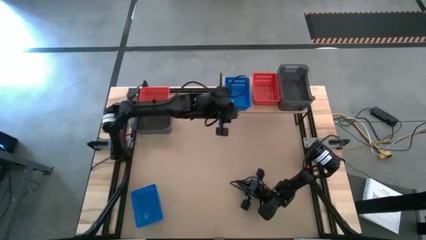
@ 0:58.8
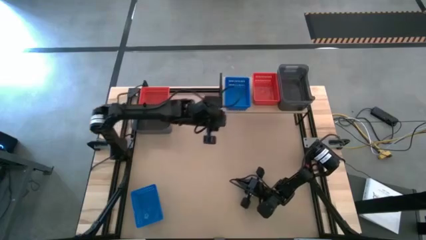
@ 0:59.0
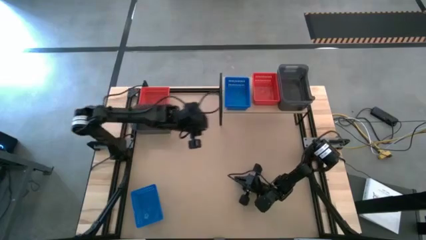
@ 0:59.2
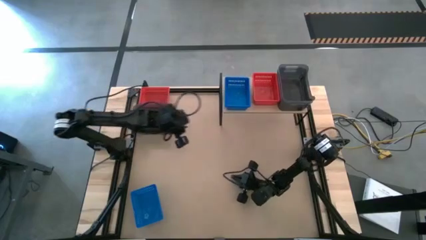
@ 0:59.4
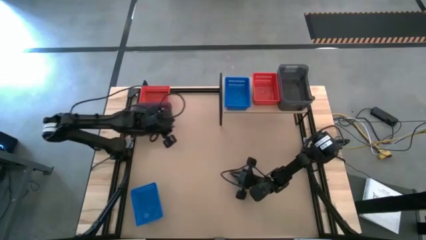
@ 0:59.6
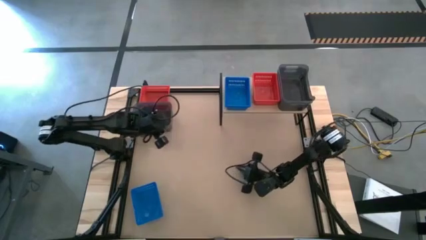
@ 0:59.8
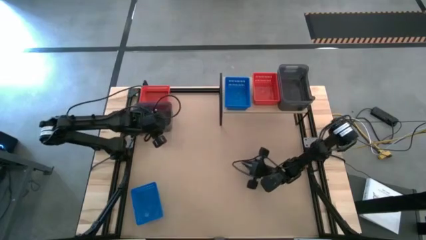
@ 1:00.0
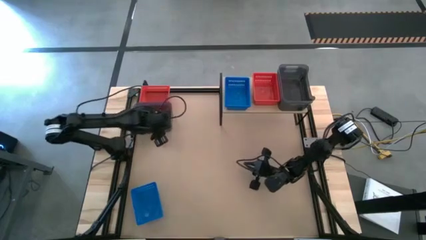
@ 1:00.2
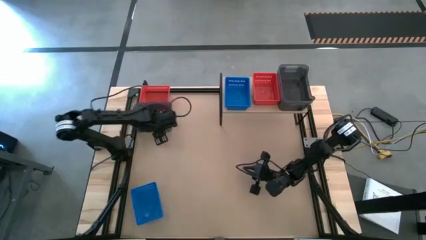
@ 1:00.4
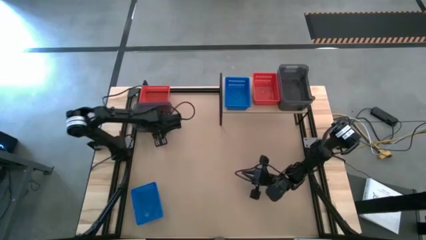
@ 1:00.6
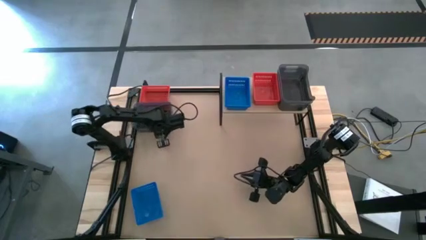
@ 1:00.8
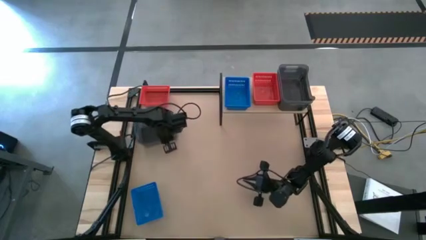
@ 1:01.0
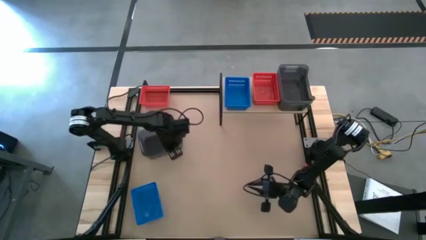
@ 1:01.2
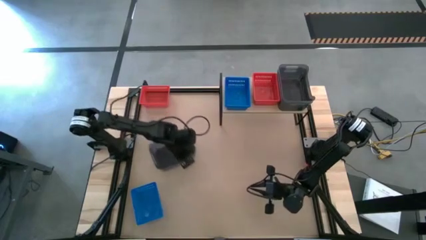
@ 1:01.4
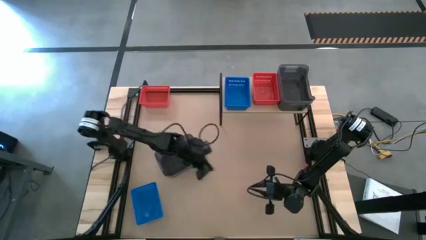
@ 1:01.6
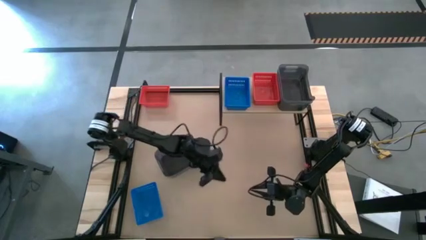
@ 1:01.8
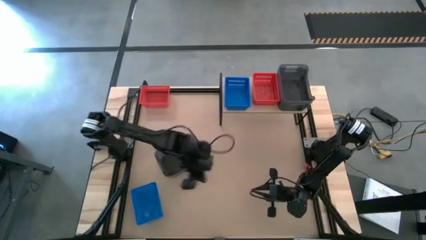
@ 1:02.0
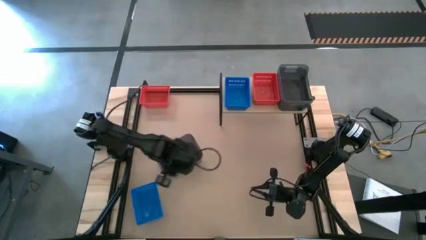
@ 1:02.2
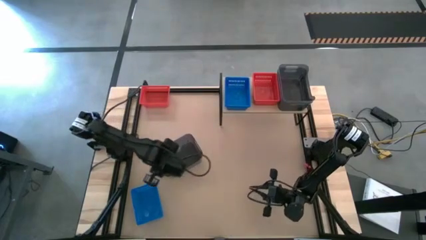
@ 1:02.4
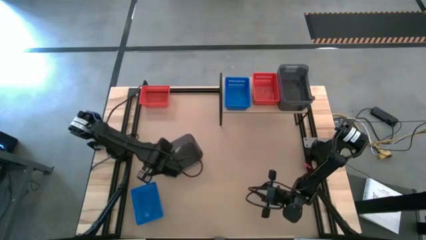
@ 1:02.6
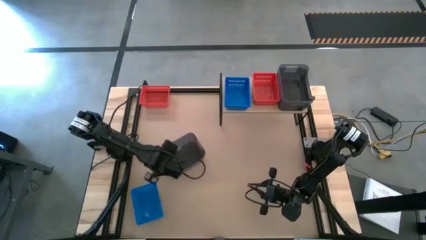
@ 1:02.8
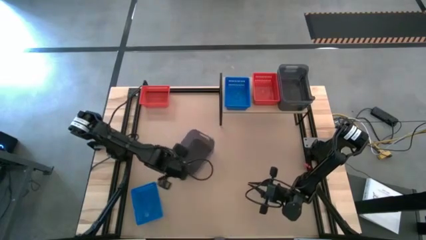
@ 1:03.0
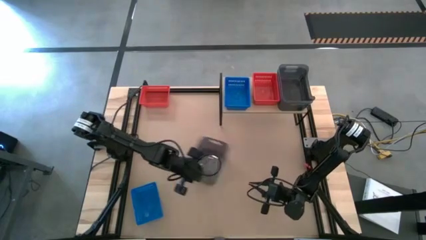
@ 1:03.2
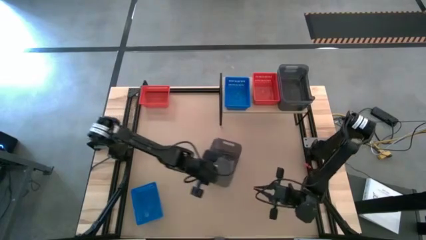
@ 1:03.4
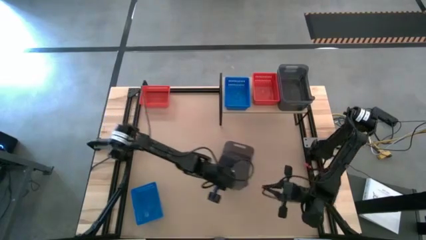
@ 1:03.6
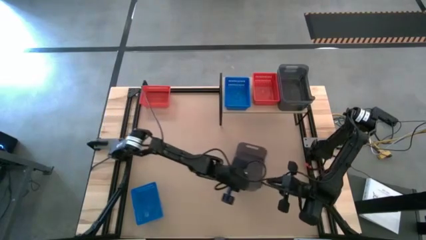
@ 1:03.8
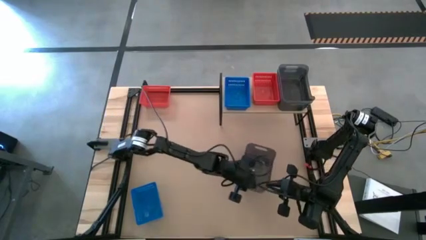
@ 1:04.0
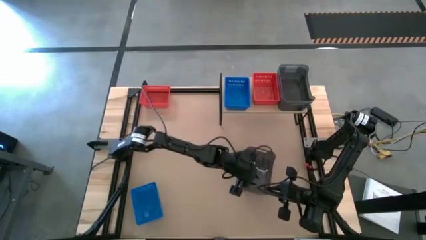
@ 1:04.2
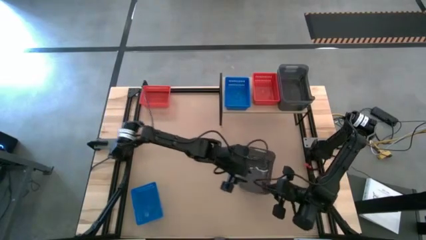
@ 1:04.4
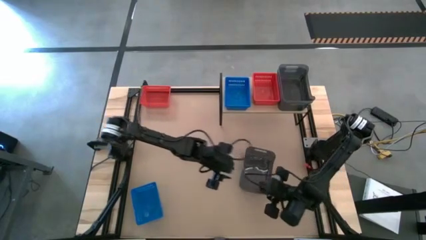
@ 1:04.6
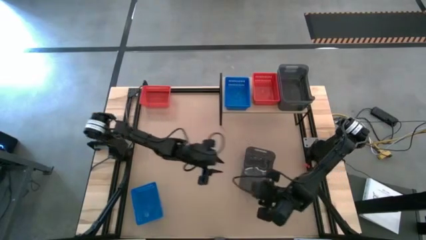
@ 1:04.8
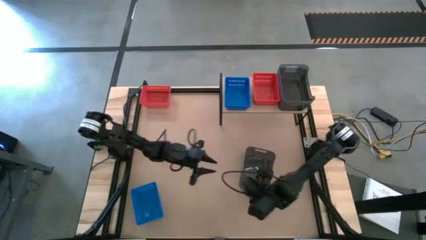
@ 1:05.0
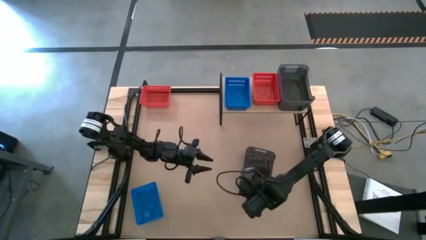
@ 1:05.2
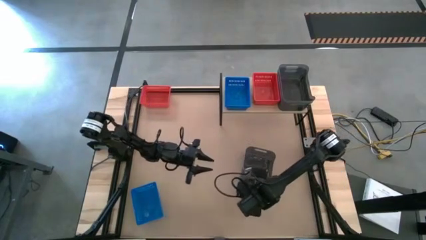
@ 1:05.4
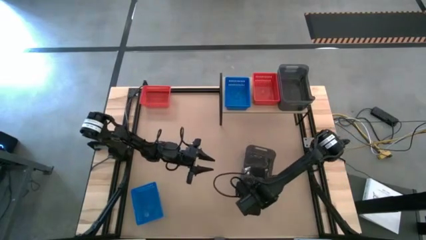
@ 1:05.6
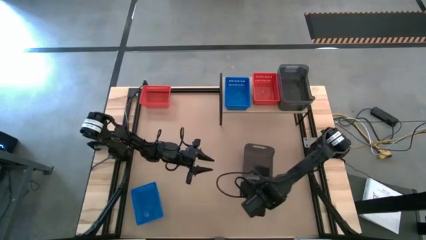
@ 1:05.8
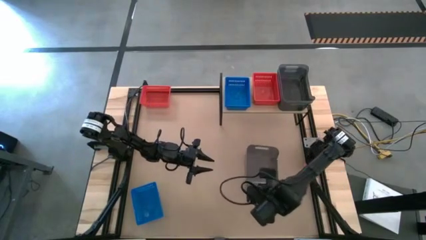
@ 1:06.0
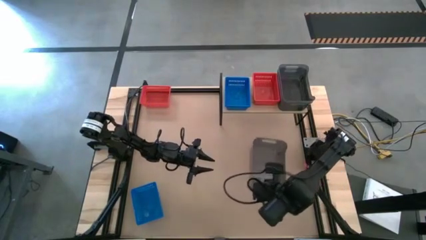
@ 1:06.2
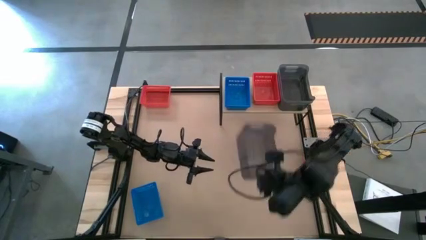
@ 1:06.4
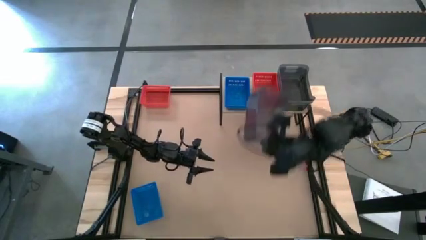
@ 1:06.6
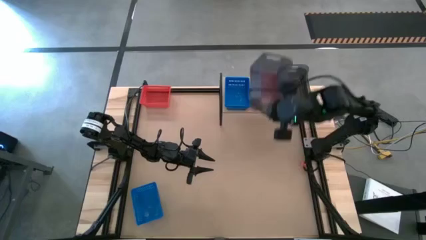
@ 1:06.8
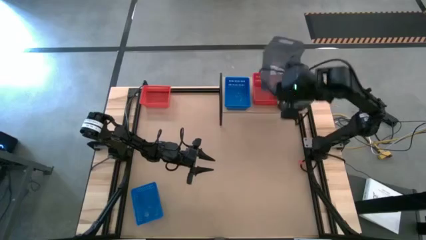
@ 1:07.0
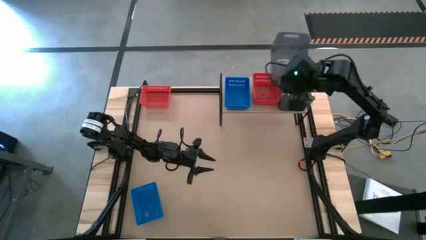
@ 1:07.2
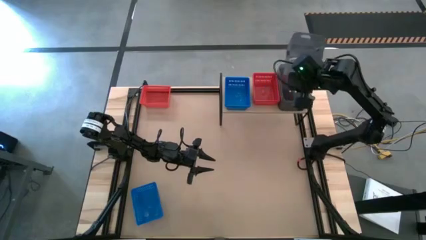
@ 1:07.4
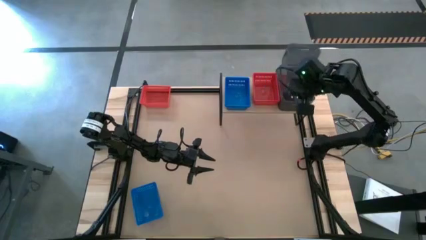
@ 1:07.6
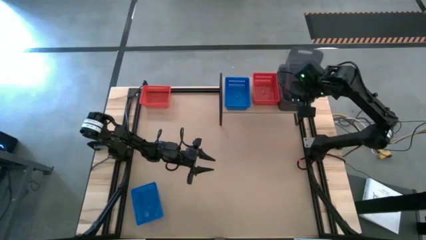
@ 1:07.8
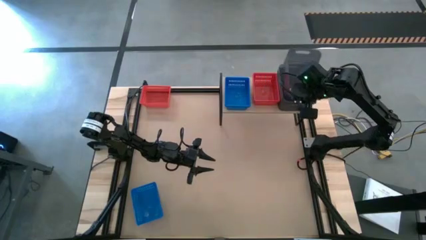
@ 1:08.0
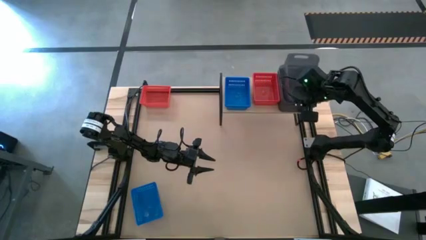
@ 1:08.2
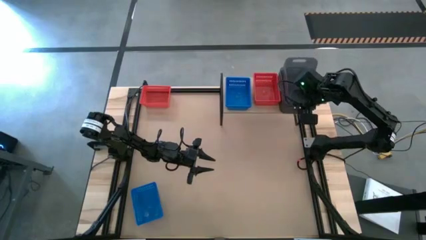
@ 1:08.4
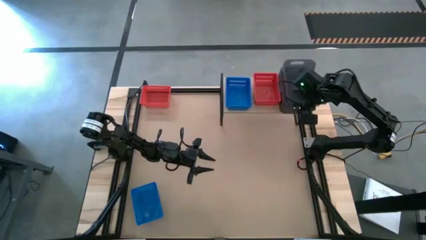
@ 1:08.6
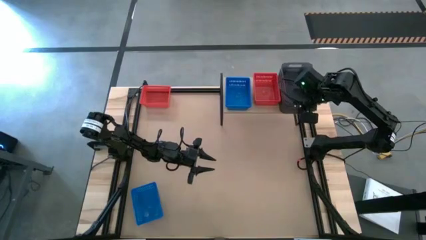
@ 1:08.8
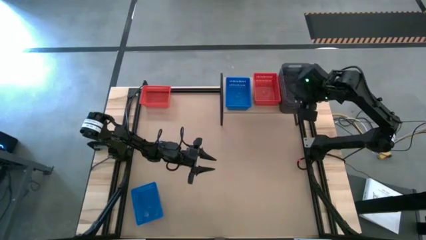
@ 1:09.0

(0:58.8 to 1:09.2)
Task: Stack baskets on shelf by color
Stack the black bin on the other black bin on the shelf

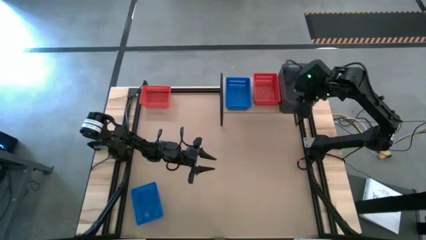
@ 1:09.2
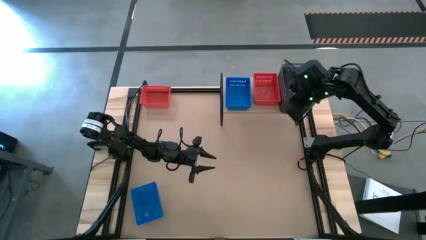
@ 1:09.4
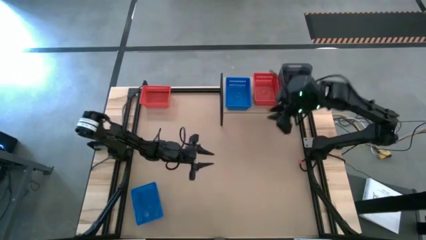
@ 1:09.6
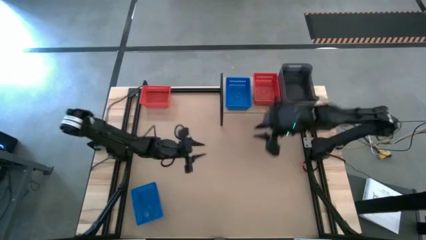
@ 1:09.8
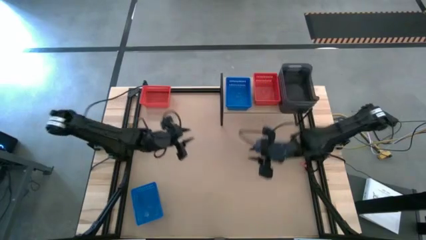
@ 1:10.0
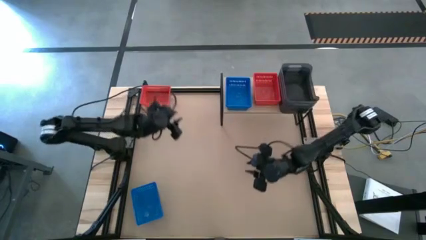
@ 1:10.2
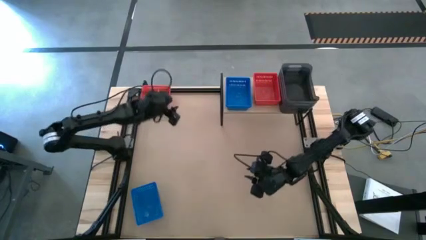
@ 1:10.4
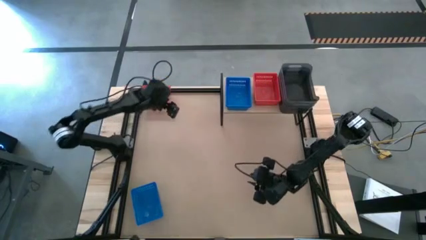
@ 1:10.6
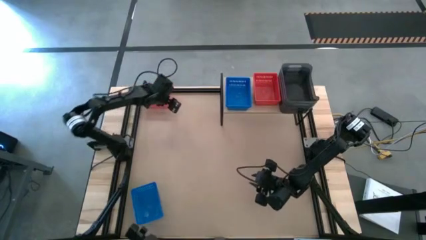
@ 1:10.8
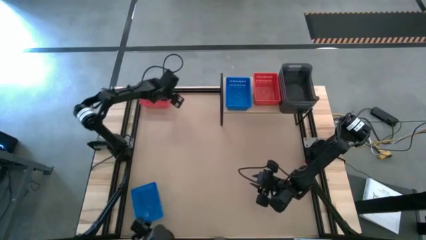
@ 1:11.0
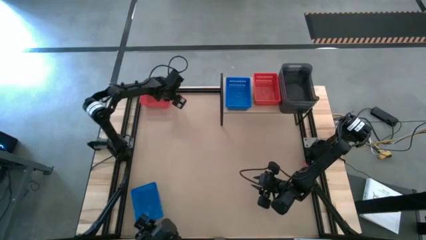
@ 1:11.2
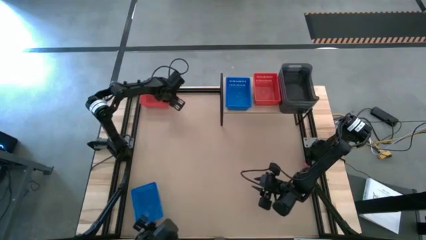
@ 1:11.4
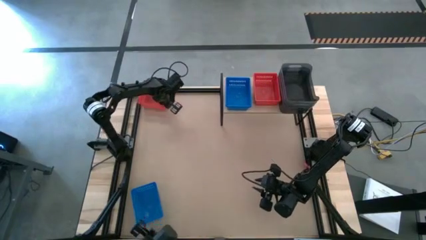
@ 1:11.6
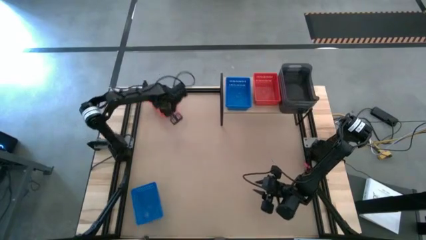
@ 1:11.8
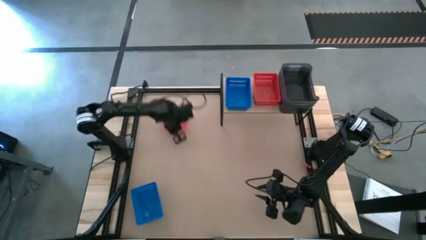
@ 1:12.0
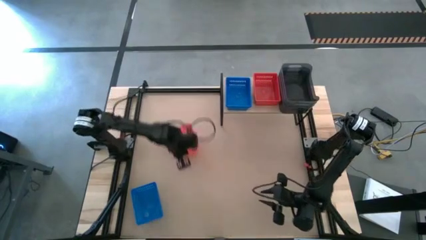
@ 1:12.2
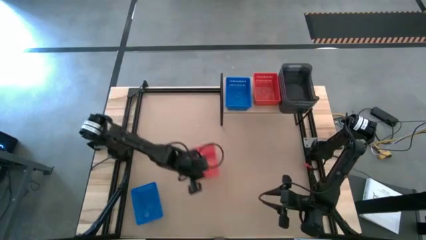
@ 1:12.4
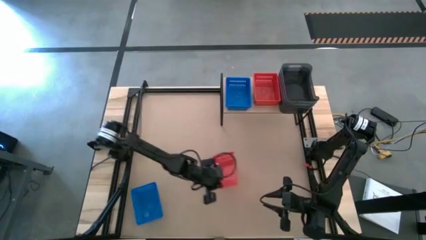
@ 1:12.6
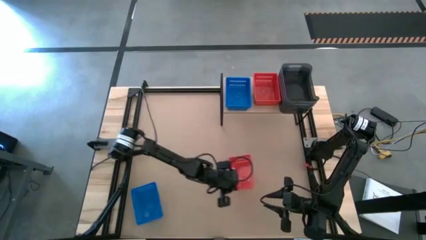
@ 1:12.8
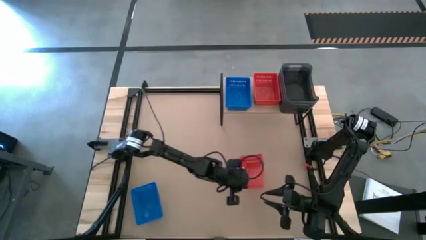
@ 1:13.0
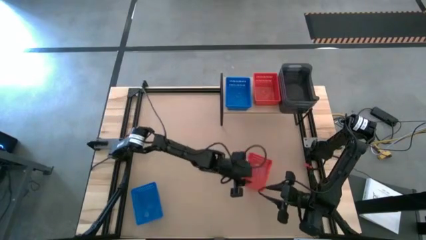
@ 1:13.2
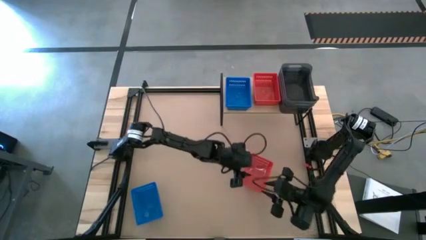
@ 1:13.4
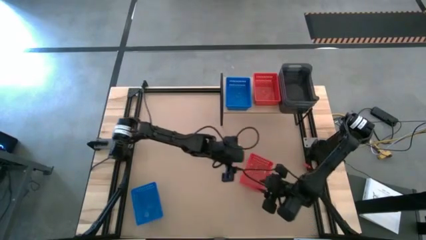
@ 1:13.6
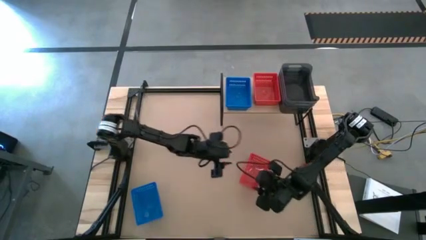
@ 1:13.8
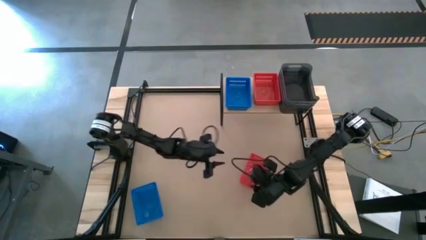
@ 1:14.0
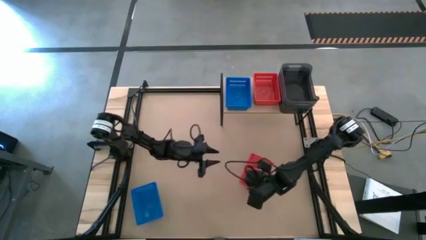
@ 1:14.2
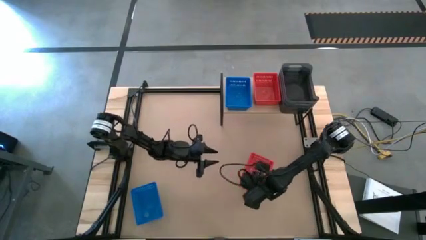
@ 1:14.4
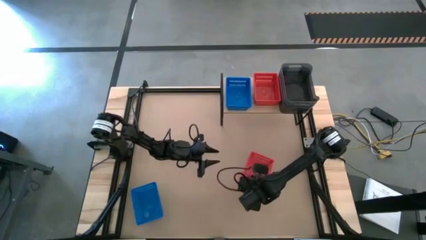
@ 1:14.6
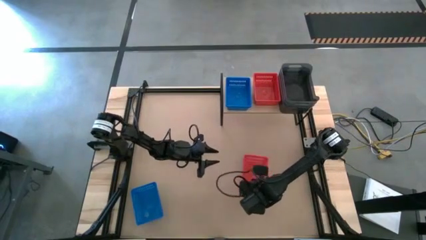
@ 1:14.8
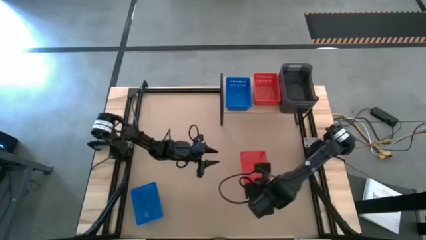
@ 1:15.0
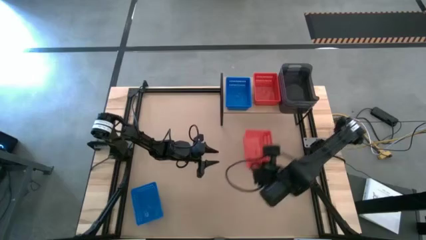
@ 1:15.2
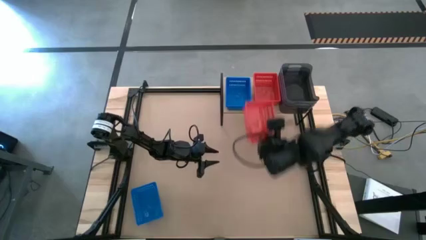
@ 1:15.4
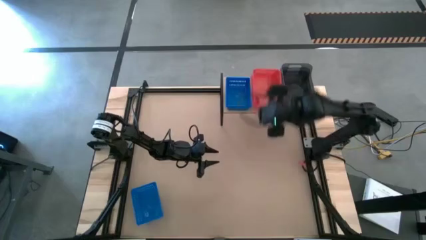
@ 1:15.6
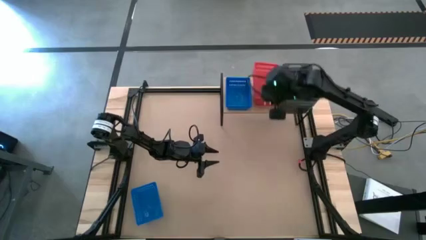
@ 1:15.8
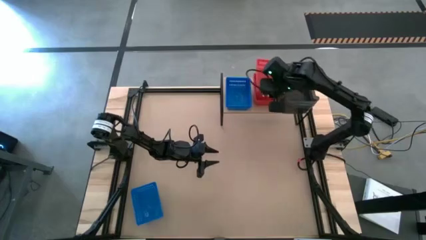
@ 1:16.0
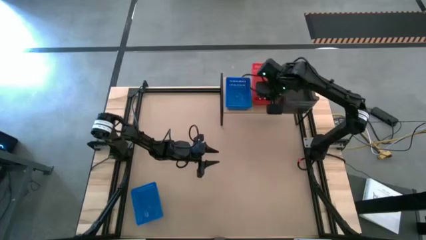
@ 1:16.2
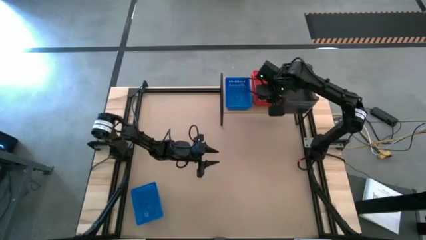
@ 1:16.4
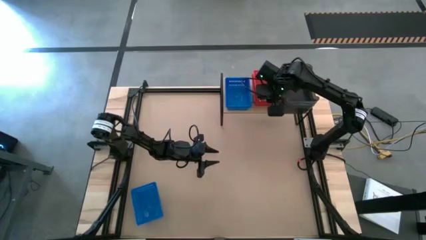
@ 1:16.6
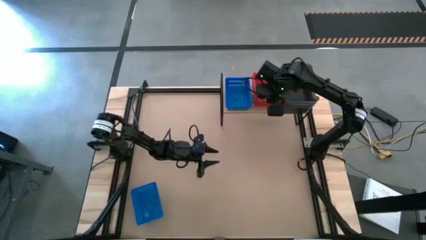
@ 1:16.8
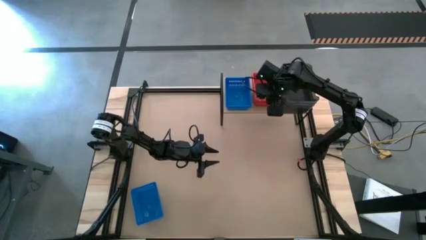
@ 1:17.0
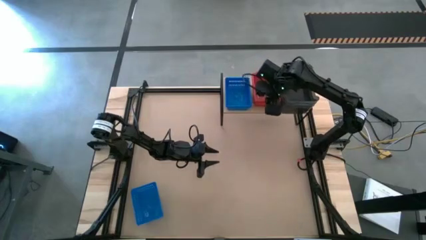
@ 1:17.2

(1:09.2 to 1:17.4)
Stack the red bin on the other red bin on the shelf
